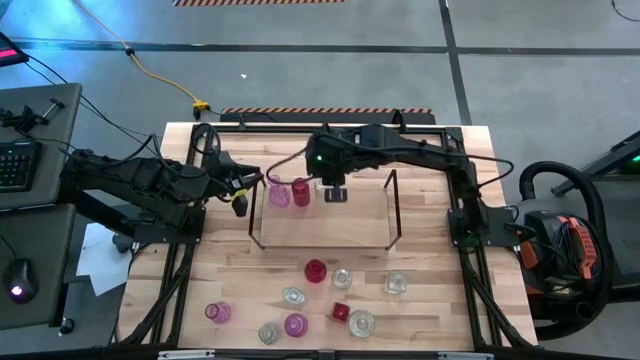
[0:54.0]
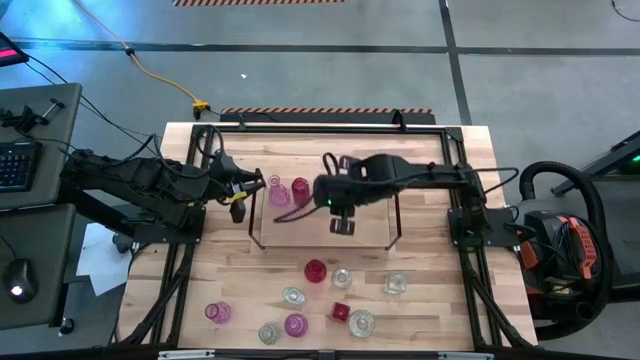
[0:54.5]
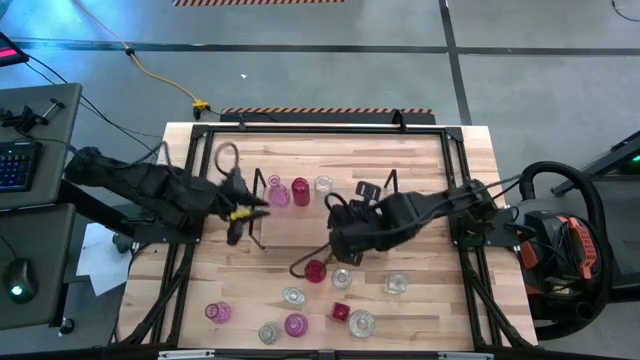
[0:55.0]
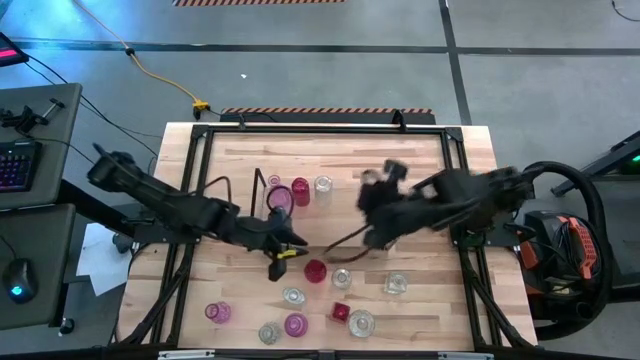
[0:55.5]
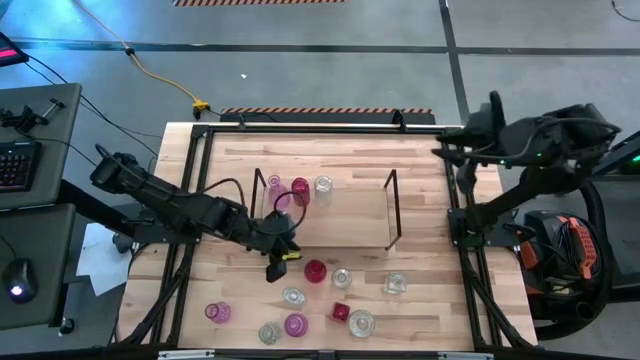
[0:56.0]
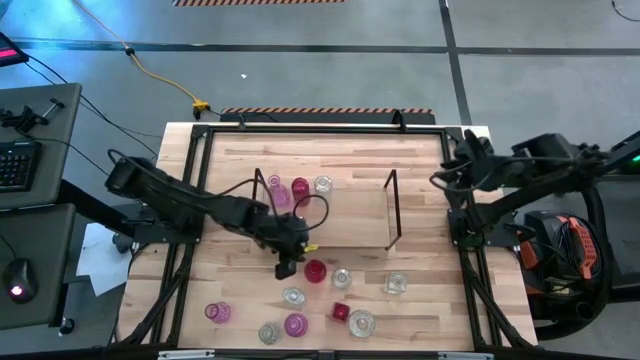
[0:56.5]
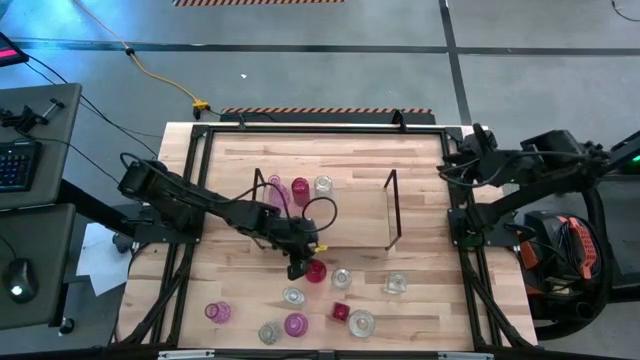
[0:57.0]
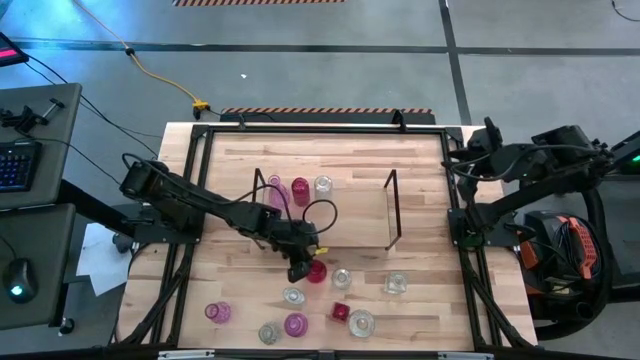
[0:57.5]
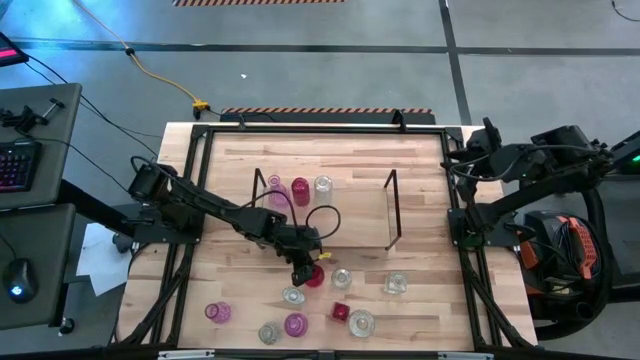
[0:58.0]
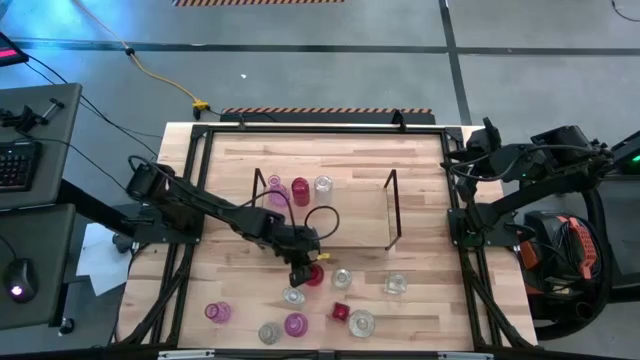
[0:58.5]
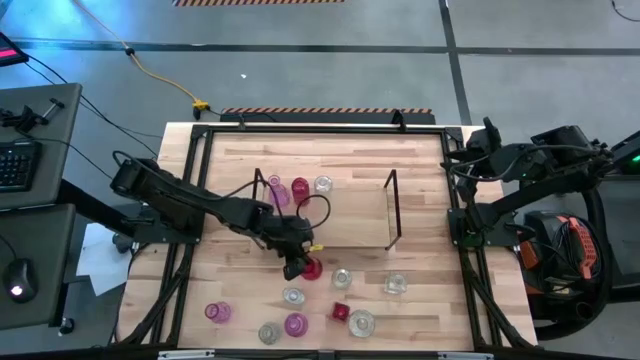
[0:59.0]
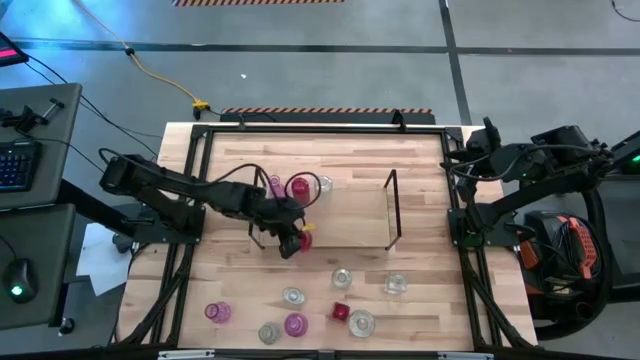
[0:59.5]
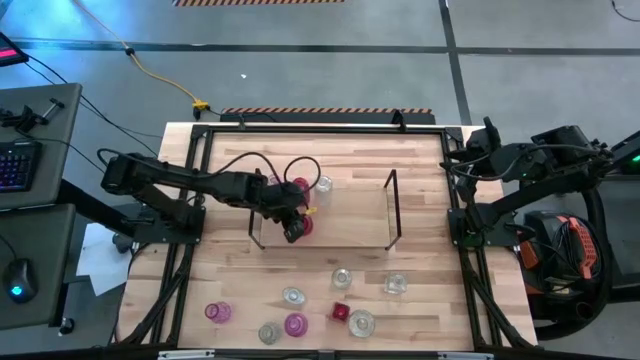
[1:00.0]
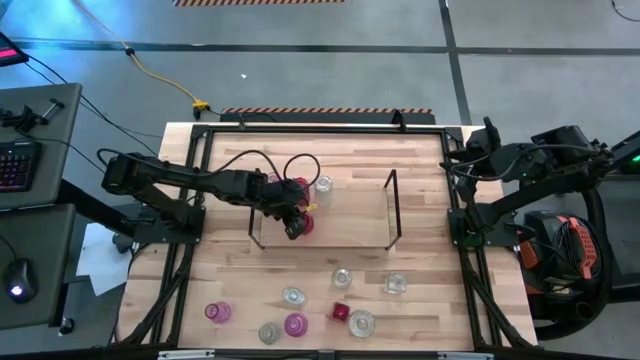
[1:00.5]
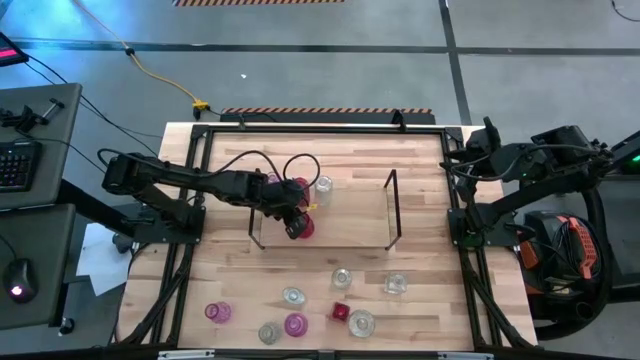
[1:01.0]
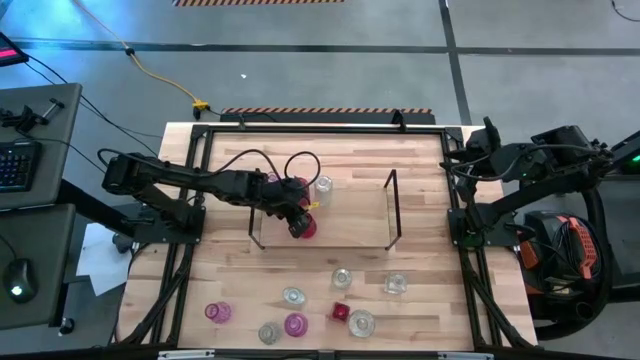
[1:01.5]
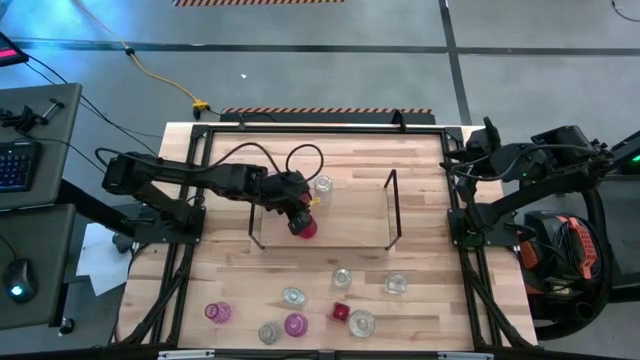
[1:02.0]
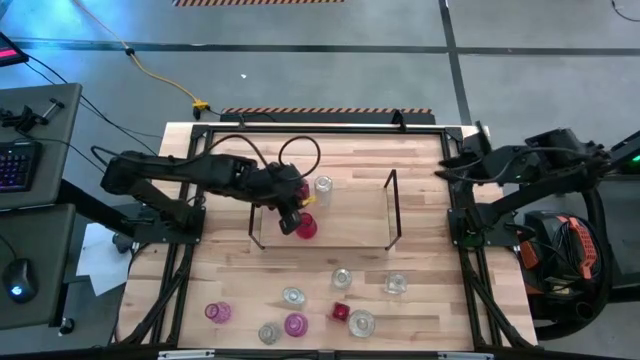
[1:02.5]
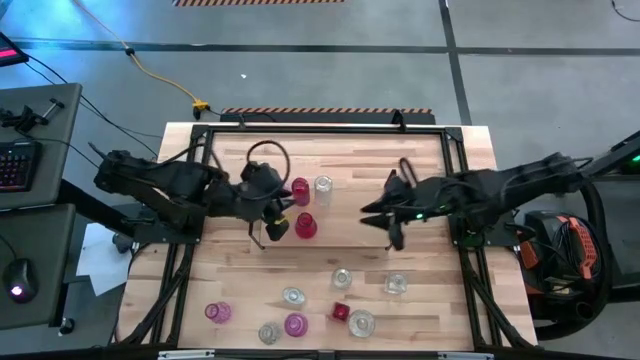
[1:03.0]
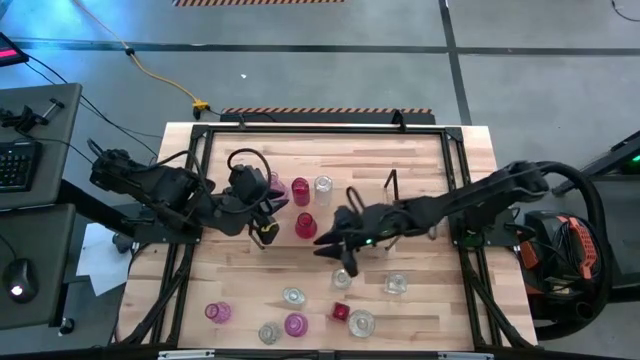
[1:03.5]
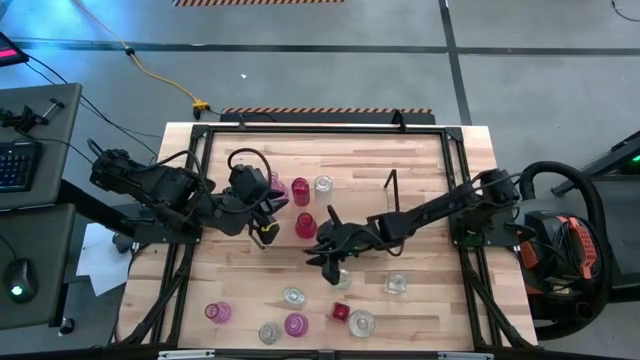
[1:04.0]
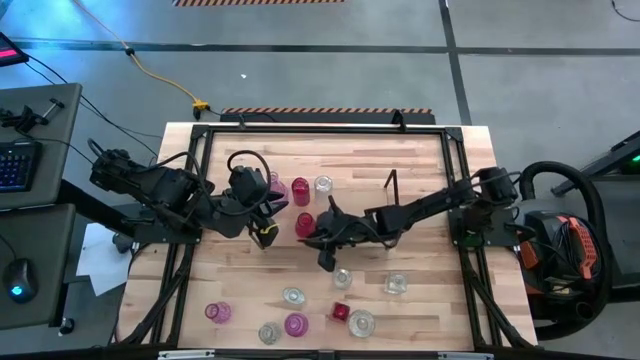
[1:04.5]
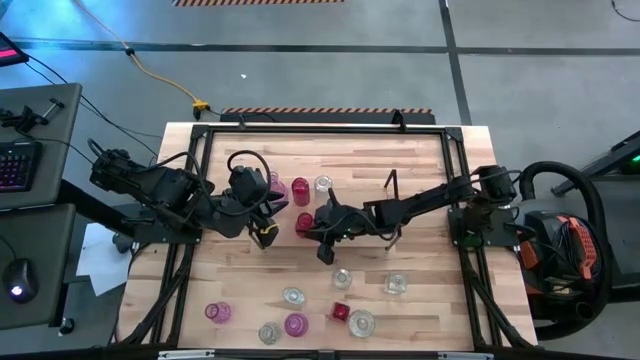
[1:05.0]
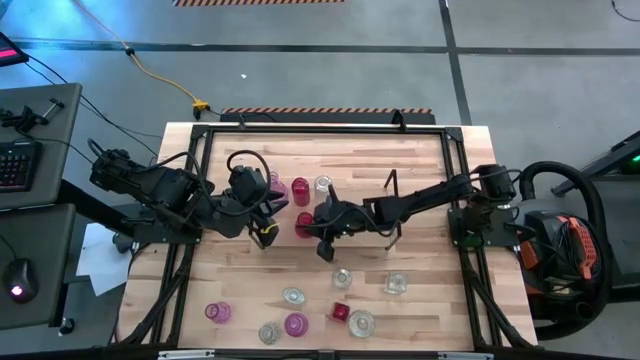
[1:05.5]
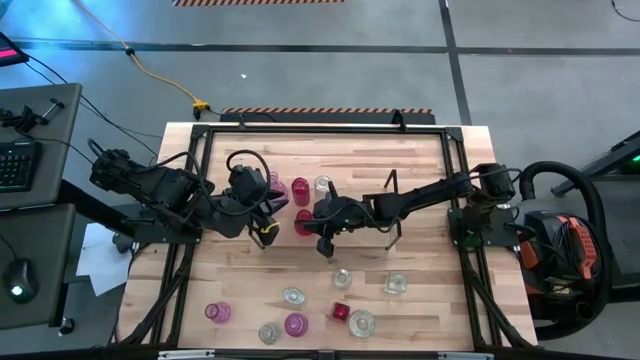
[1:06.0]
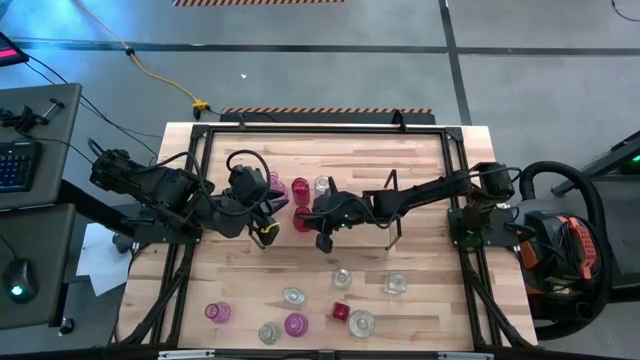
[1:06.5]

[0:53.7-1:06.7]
Task: sort vases onto shelf
Put the red vase aligned with the other red vase on the shelf

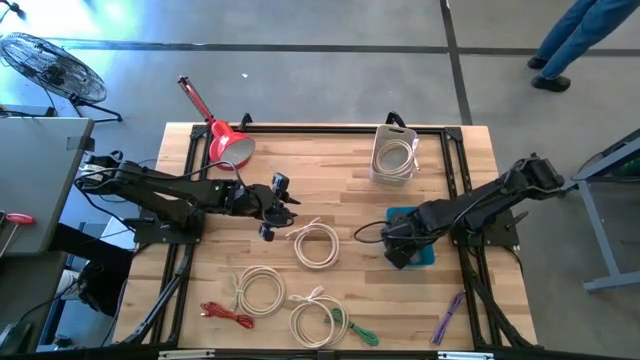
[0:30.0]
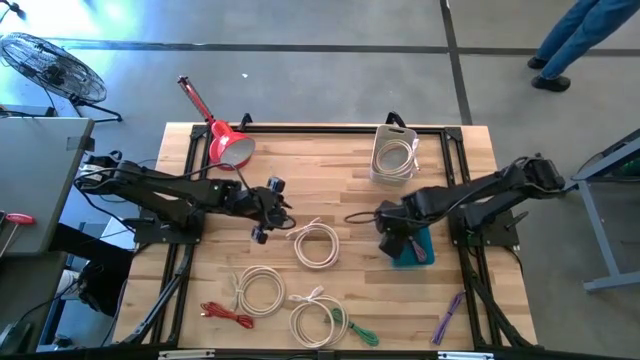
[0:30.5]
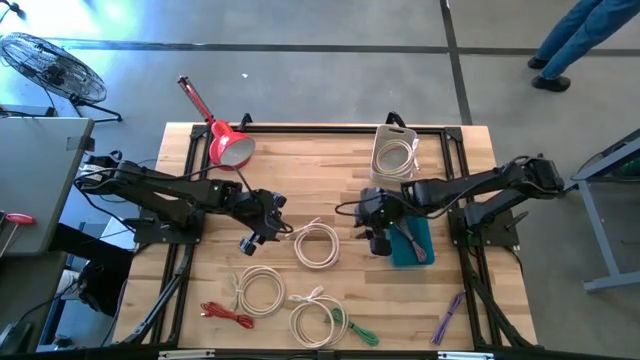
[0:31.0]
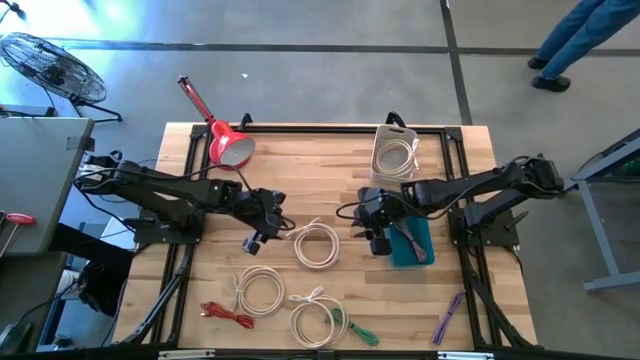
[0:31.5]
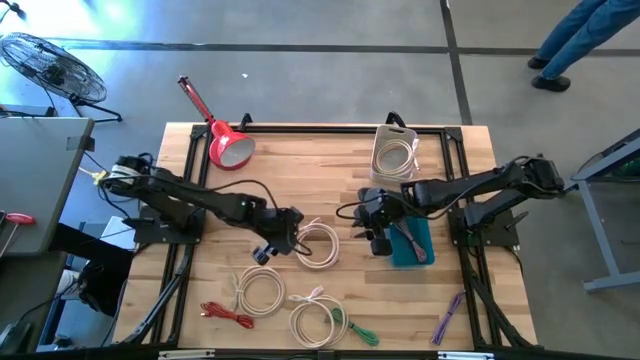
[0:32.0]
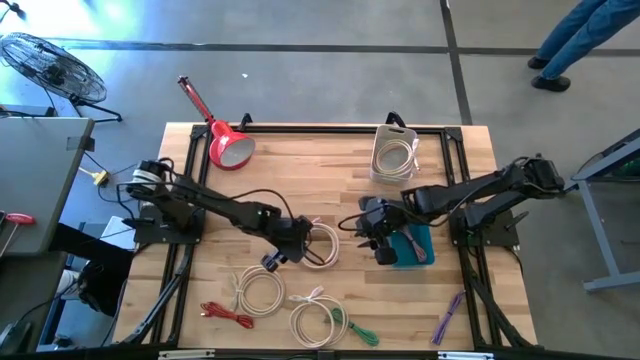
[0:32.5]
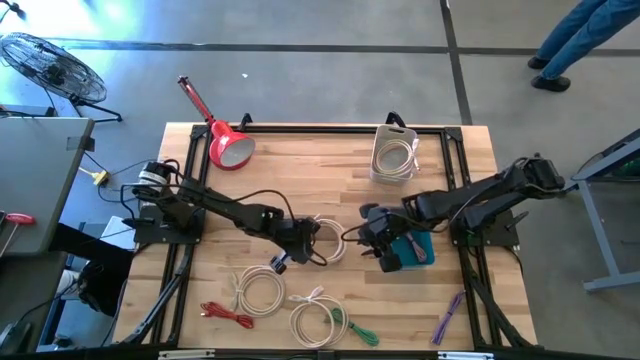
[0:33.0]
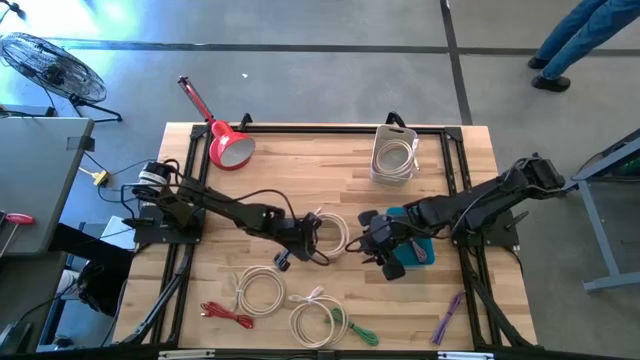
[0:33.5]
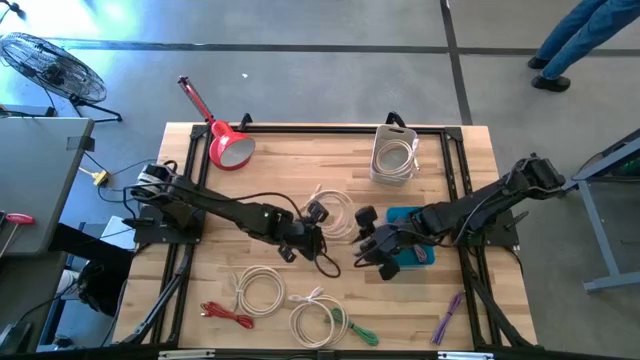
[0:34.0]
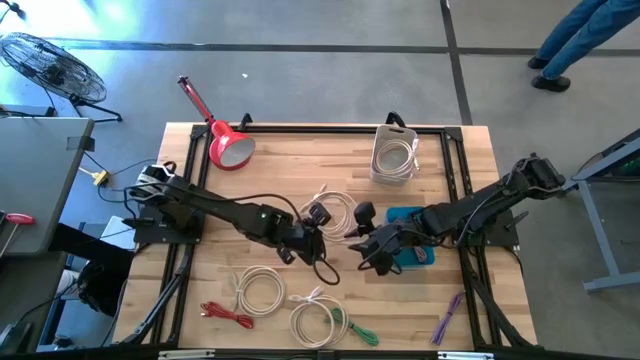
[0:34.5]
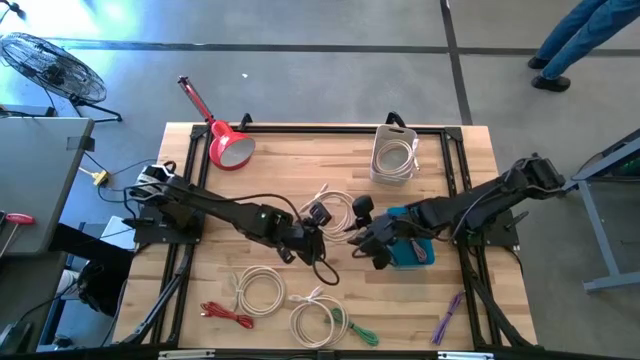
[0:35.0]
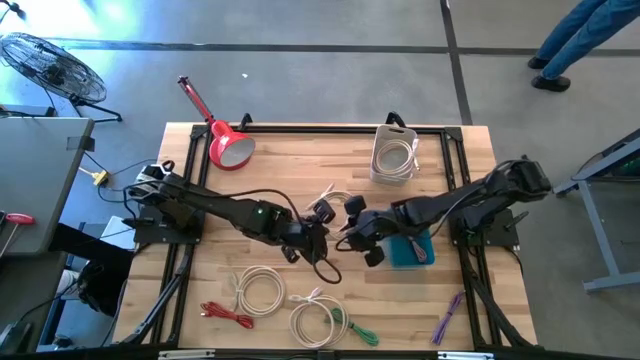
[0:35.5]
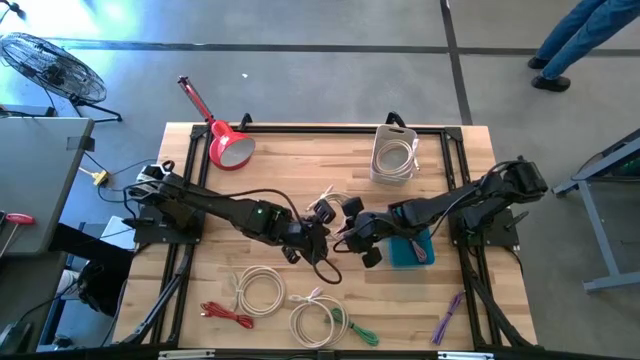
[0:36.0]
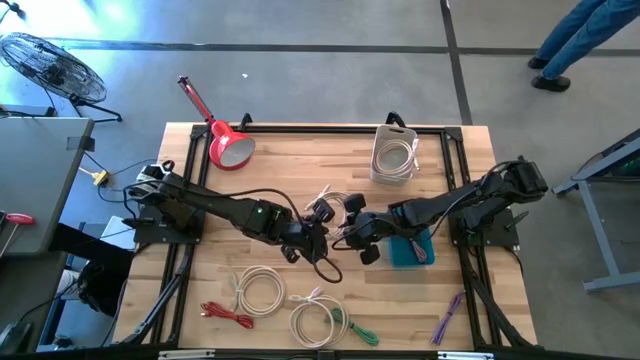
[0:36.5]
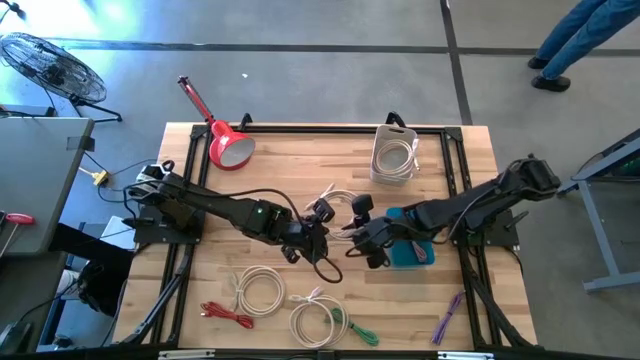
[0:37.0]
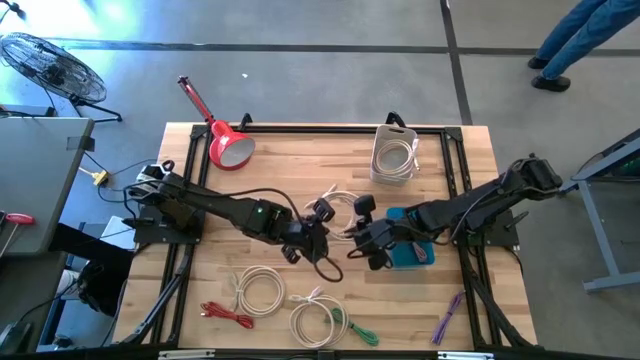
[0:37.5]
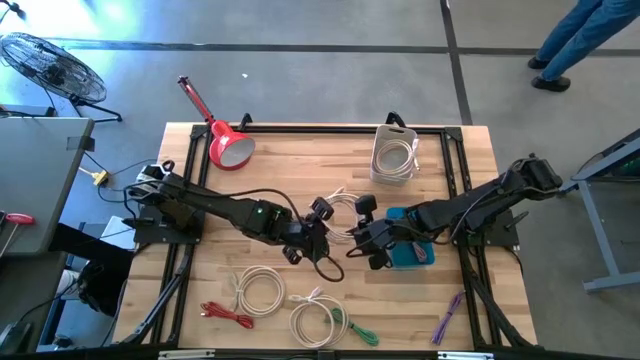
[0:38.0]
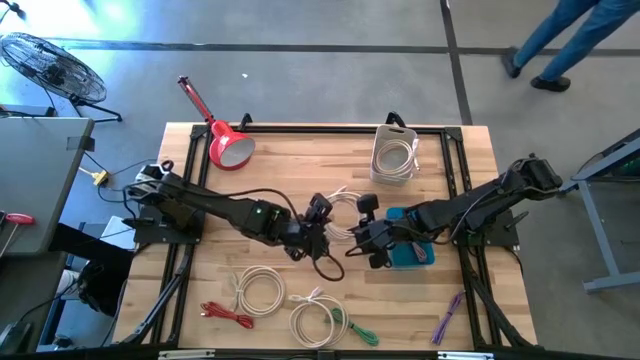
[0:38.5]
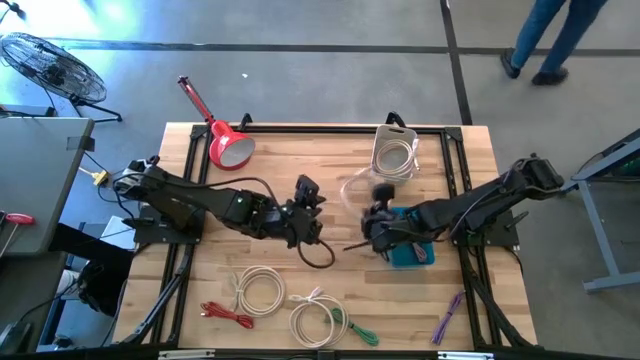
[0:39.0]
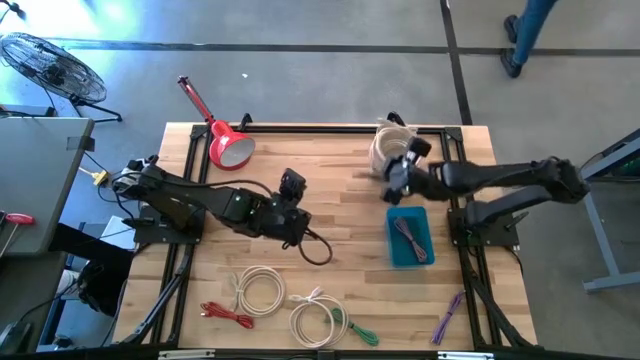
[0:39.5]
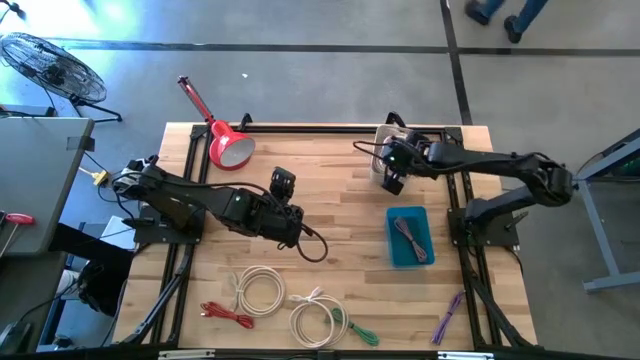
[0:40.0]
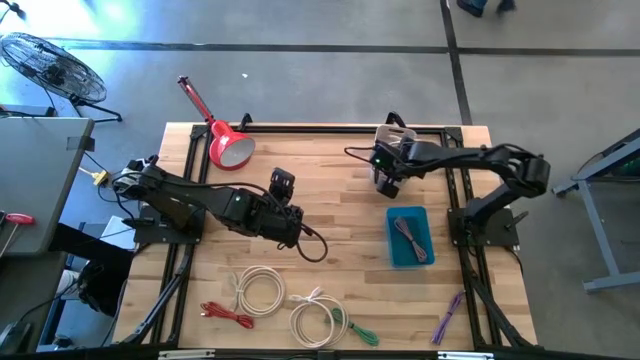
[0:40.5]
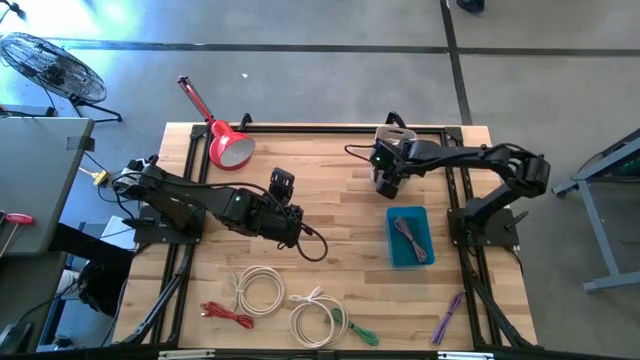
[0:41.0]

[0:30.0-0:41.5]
Task: Pick & Place USB Port
Put the white HDMI cable into the white bin
